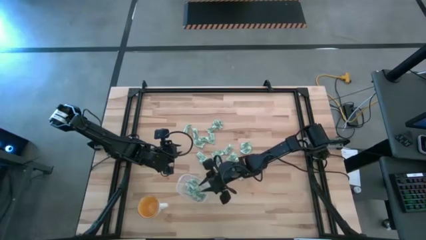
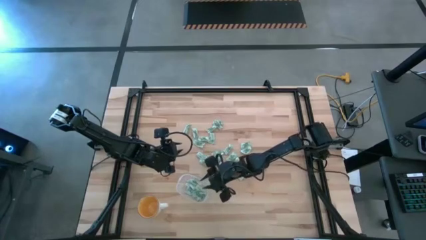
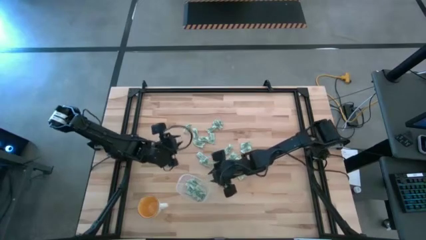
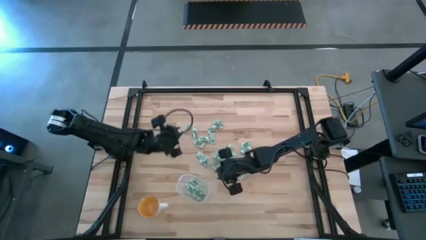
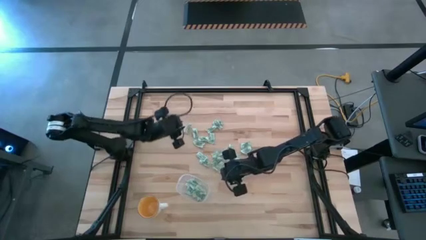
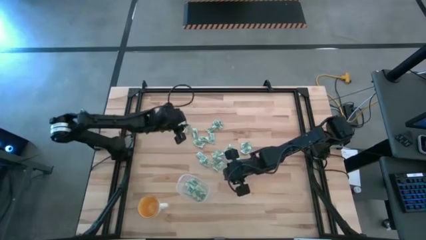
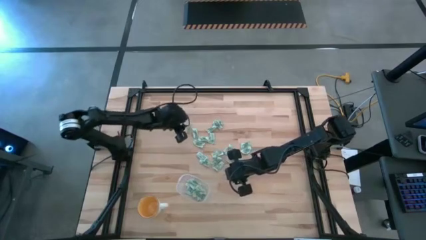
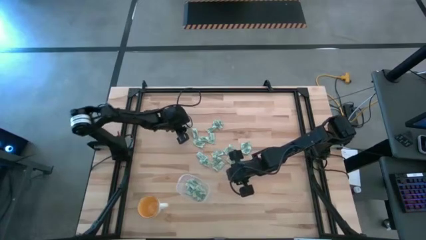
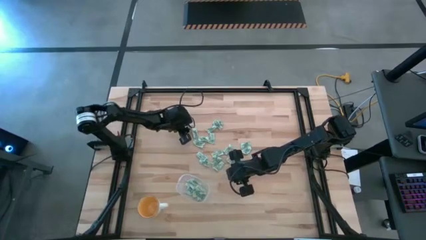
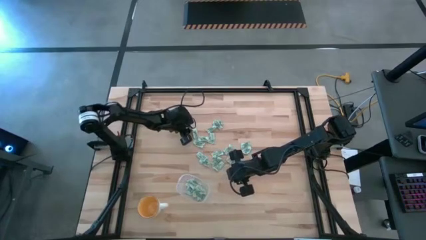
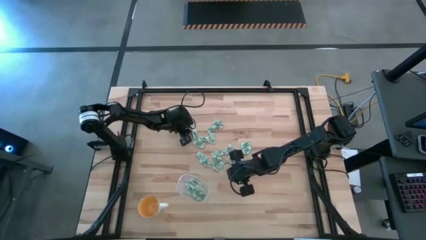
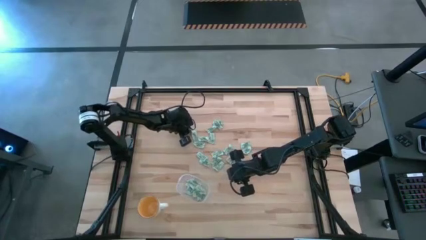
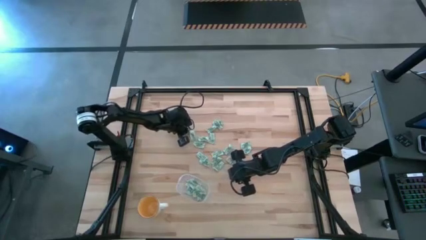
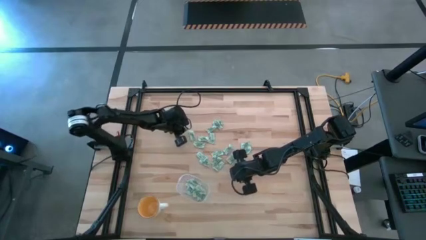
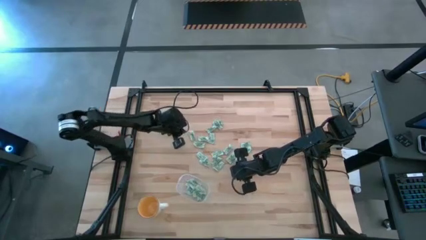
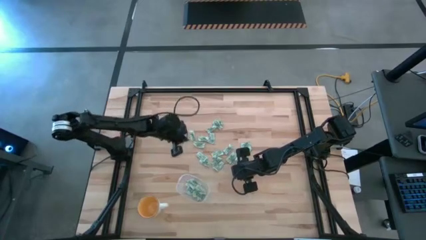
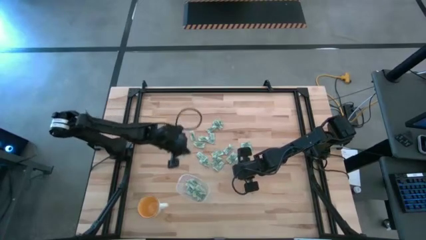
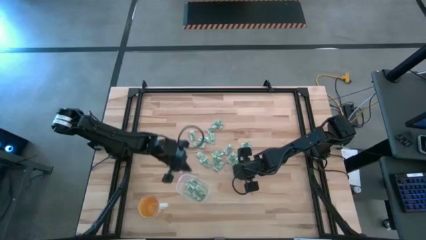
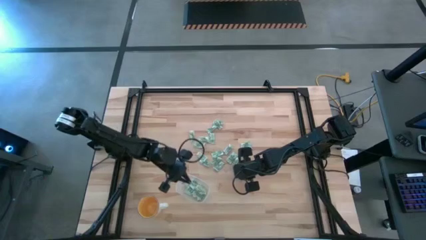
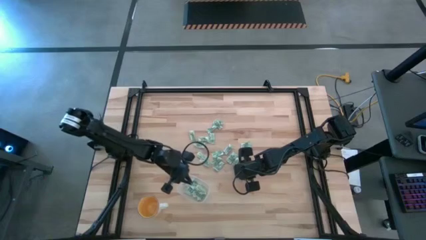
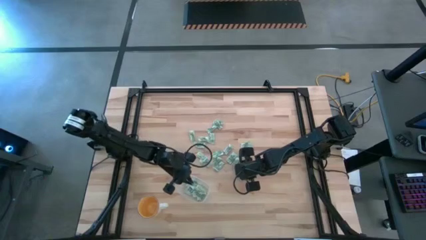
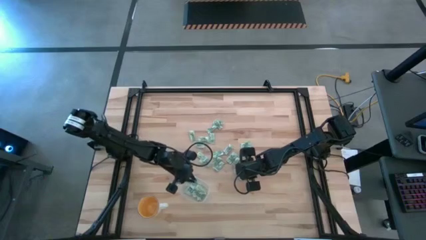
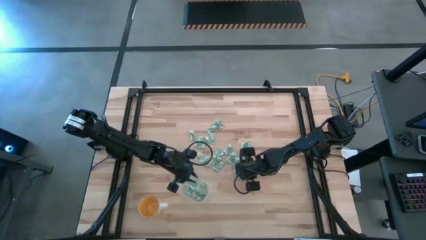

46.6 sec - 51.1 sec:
Task: Pick and place Stevia / Truvia into bins
Put the stevia packet into the transparent container

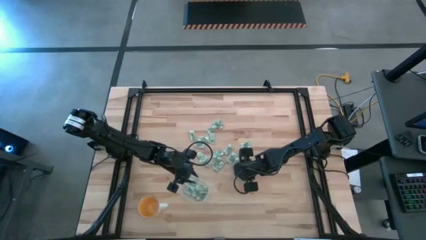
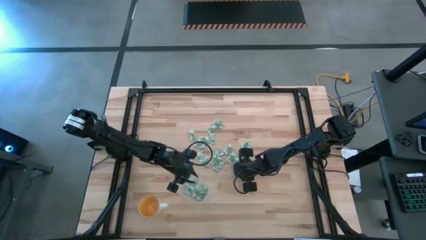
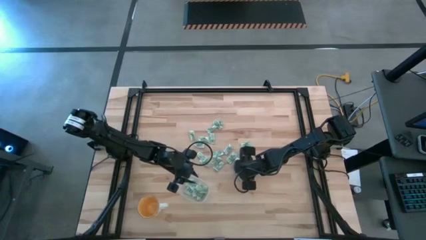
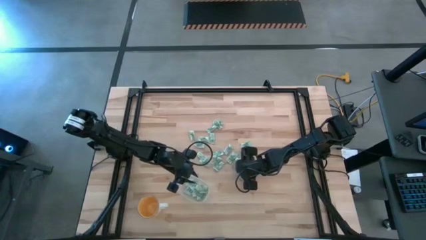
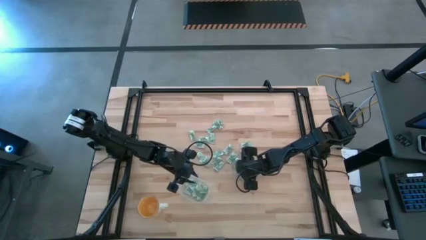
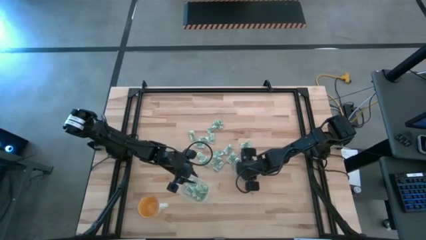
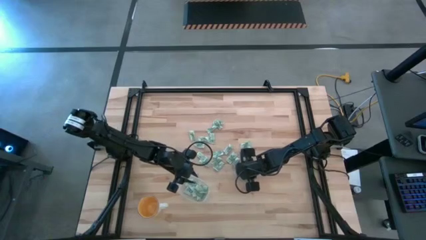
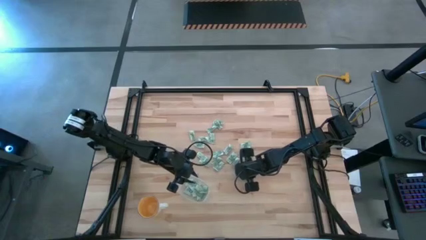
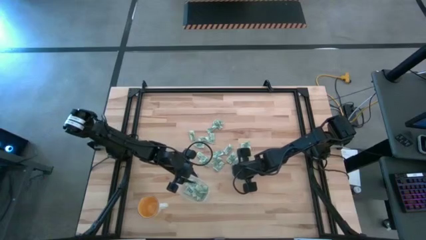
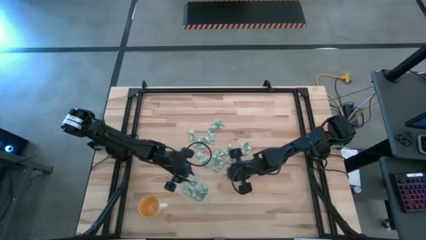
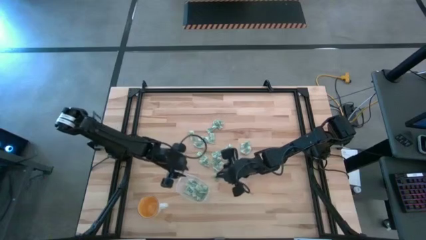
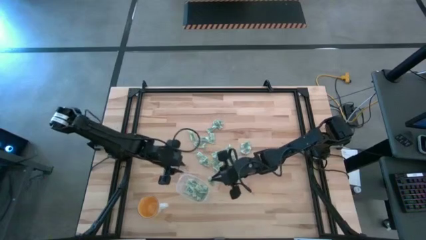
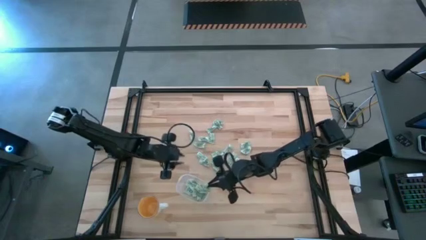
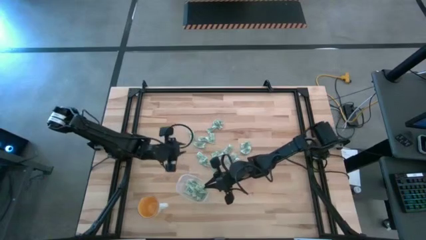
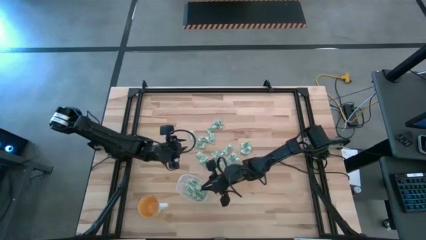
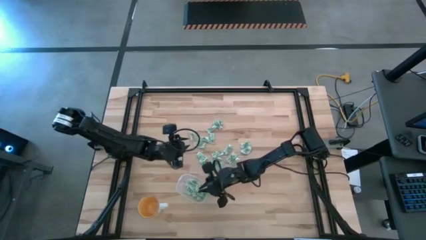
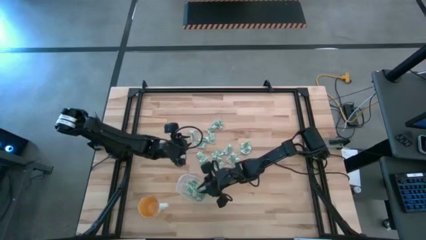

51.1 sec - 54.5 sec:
Put the stevia packet into the transparent container

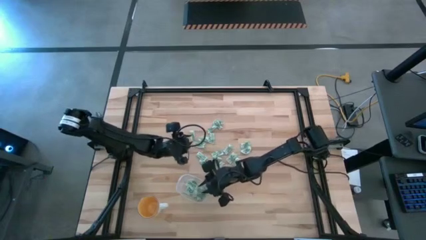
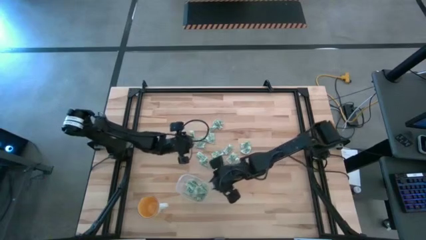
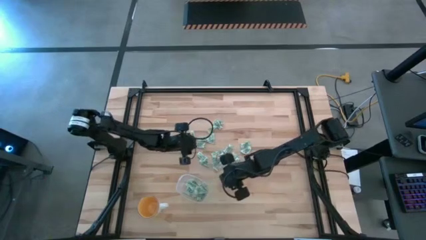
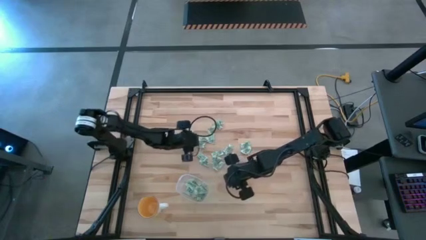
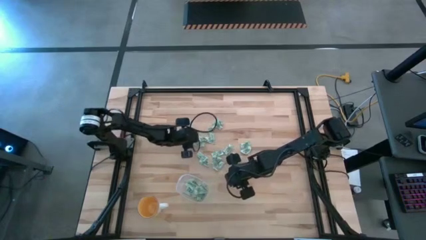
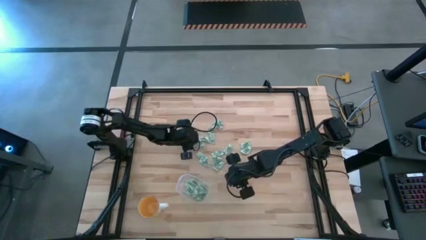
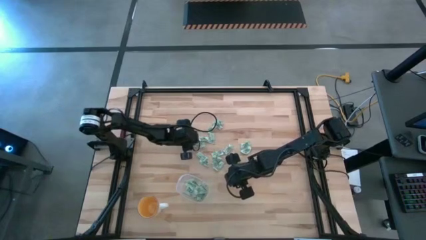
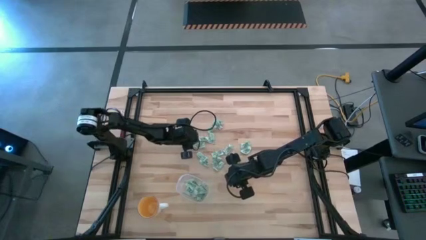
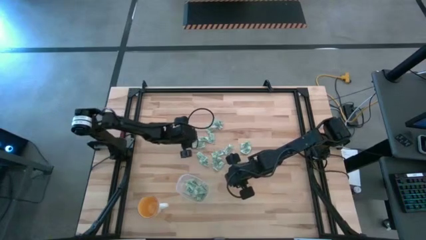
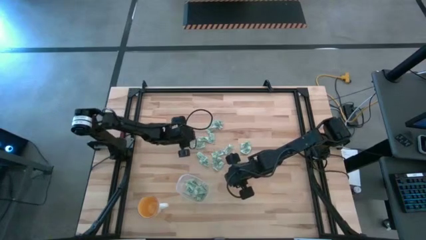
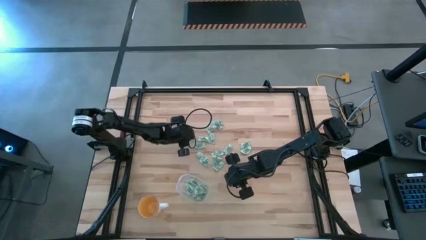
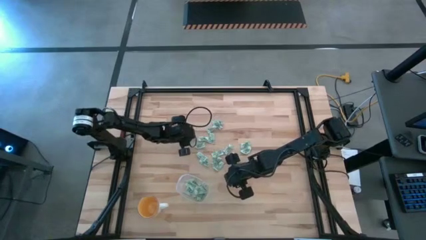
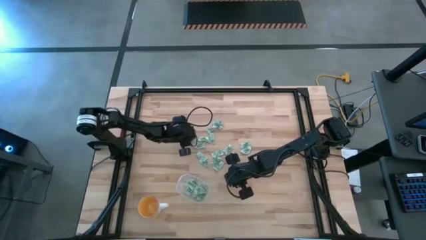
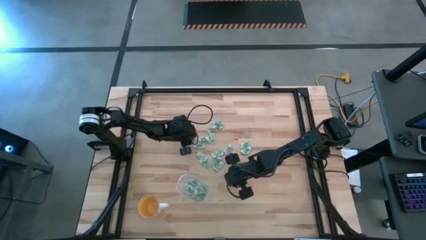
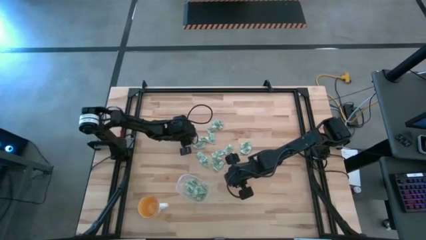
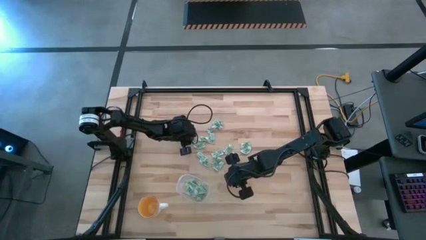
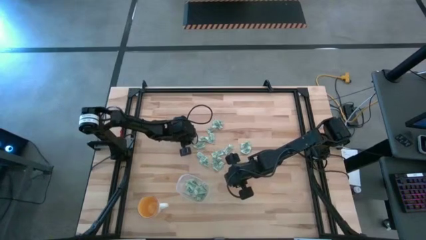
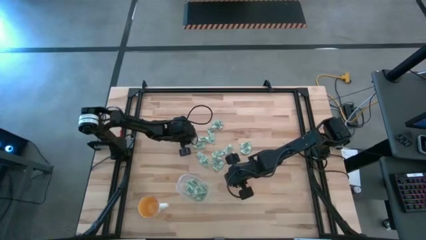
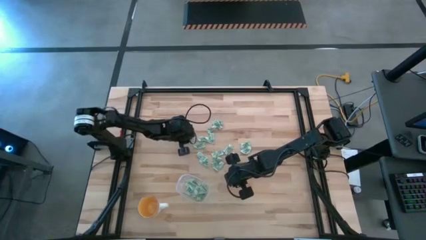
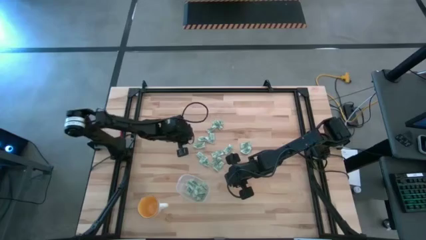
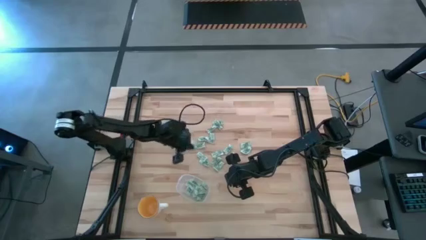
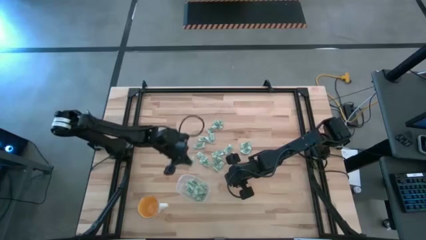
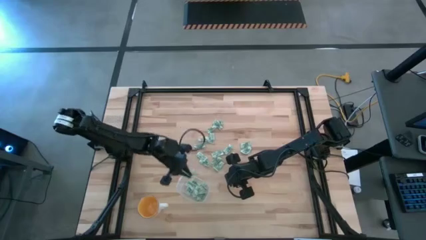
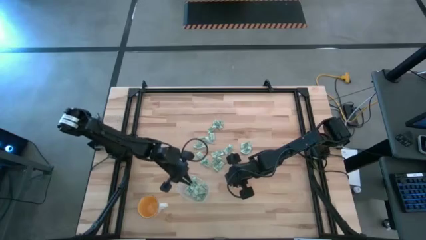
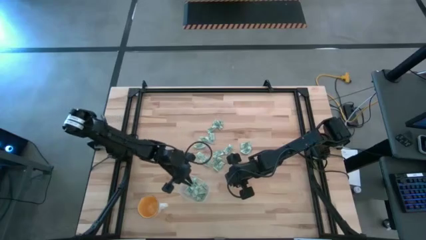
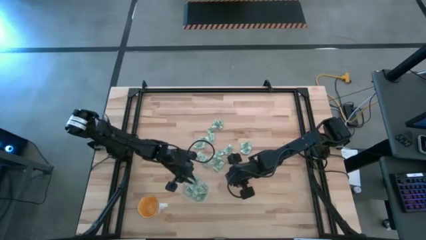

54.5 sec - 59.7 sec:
Put the stevia packet into the transparent container

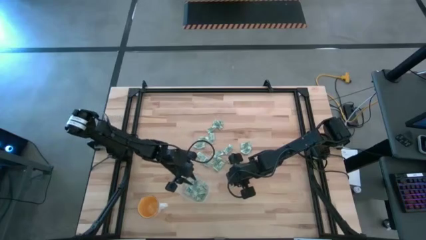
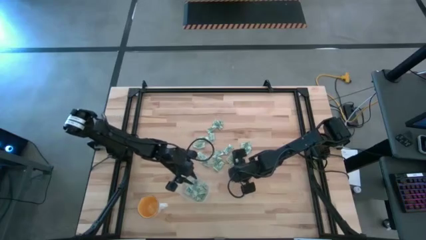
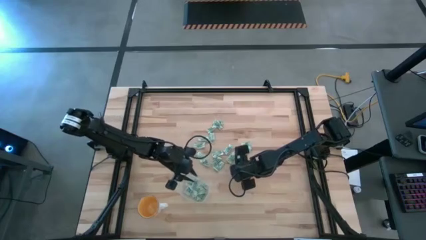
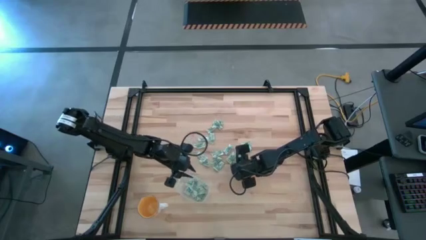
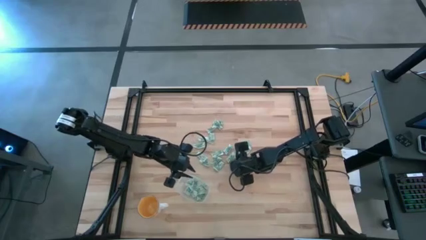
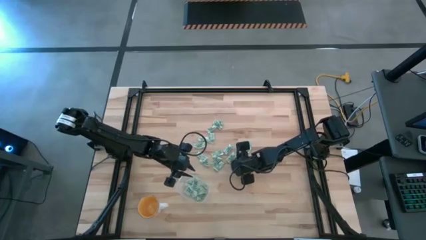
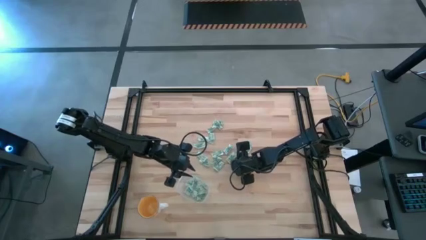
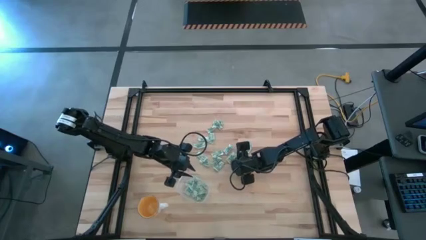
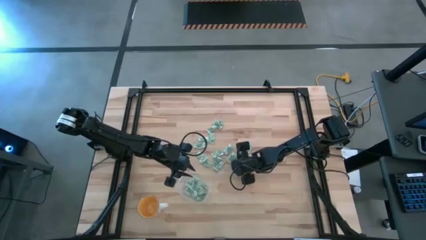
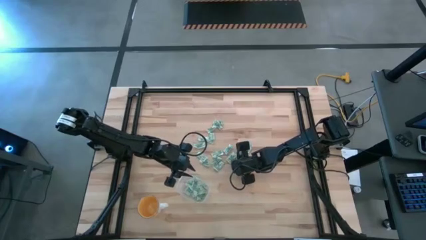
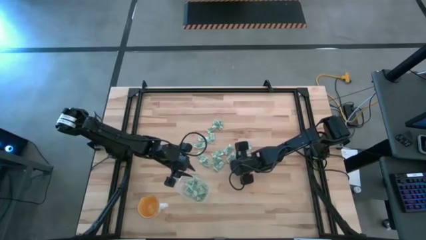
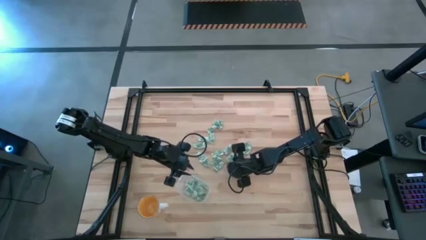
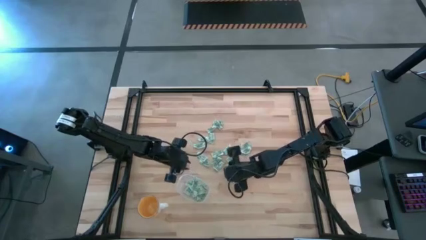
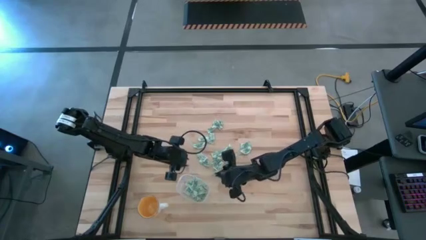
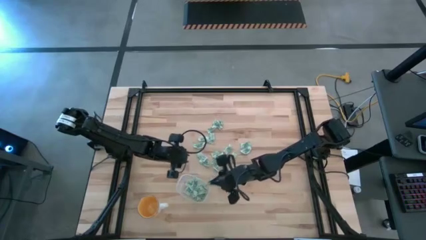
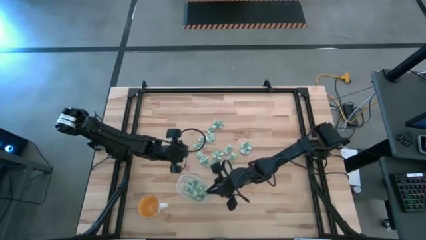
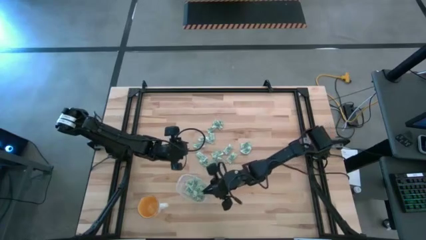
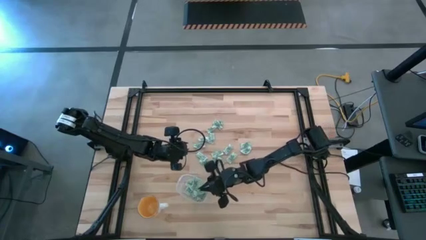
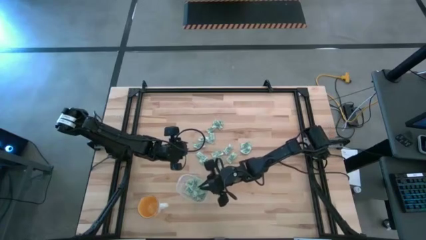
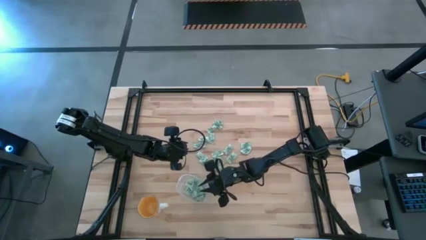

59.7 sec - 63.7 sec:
Put the stevia packet into the transparent container
